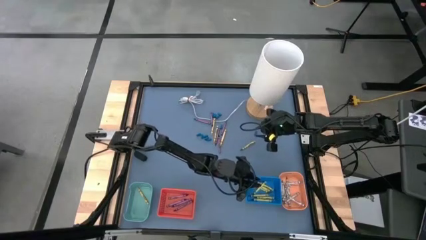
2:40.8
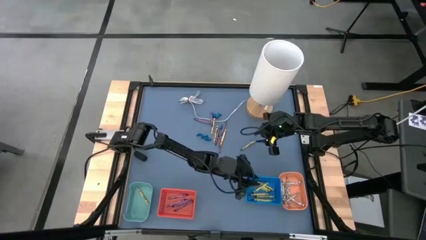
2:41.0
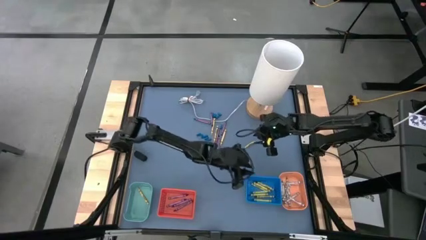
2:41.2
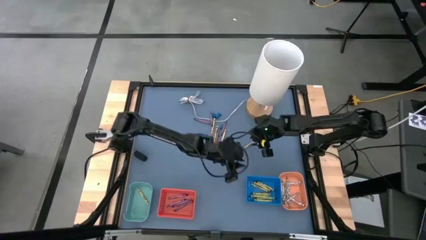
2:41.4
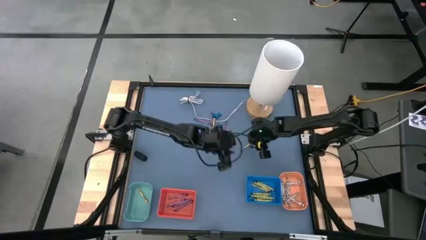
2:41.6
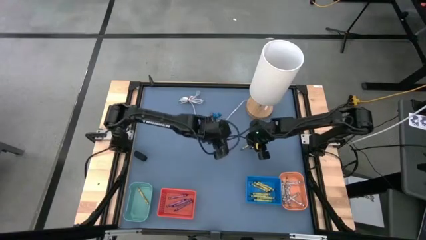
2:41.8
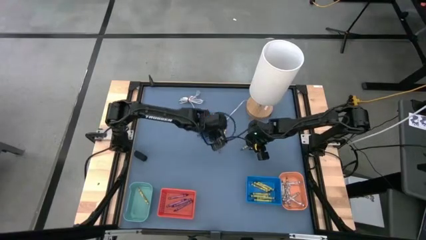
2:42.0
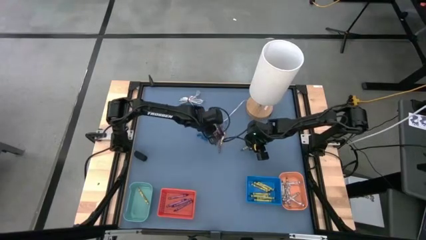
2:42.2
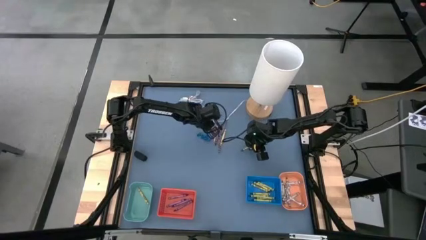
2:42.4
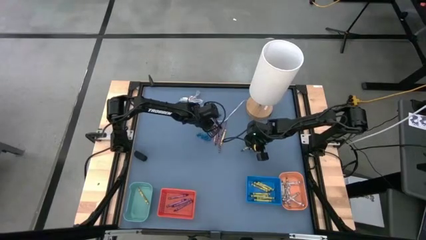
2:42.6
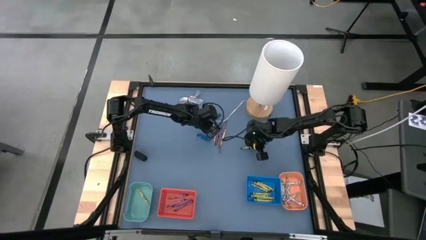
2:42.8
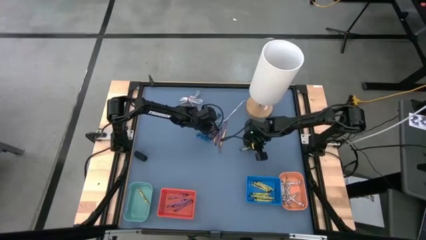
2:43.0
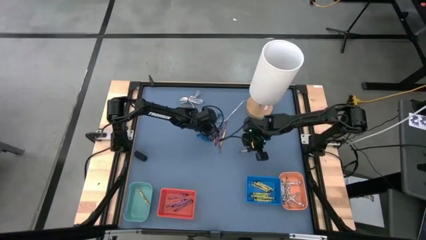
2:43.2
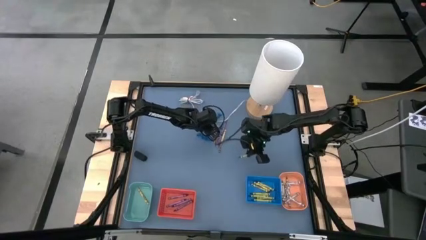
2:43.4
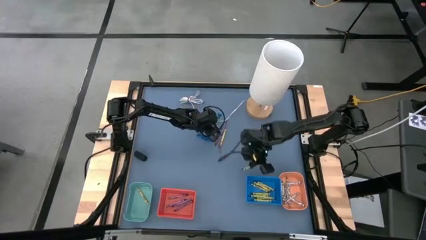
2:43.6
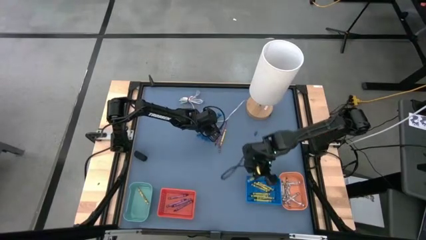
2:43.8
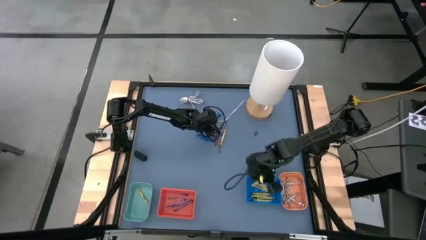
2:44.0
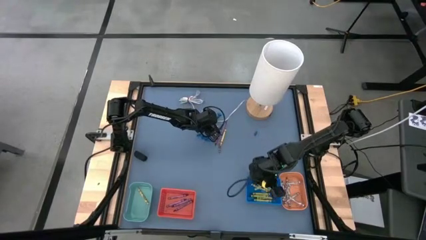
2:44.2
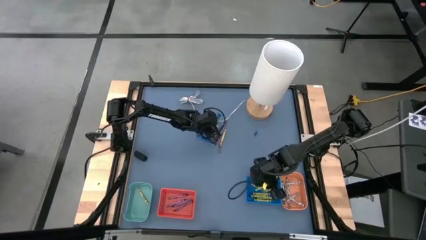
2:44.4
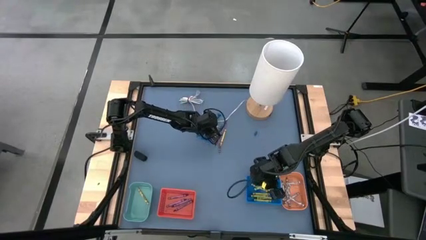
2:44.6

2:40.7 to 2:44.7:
Task: Sort crayons
Put the green crayon into the blue basket

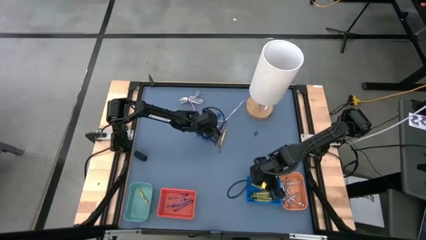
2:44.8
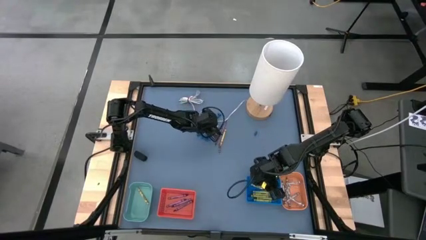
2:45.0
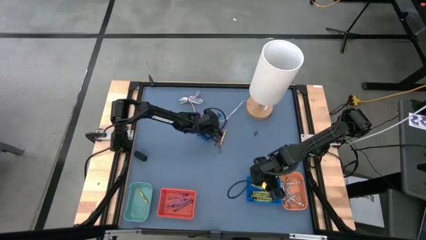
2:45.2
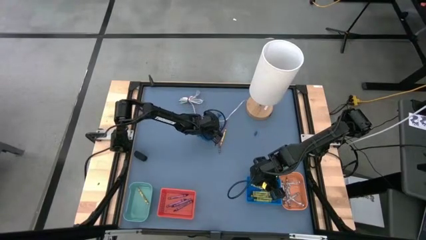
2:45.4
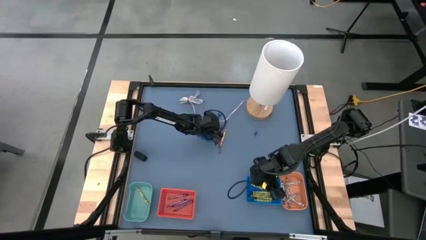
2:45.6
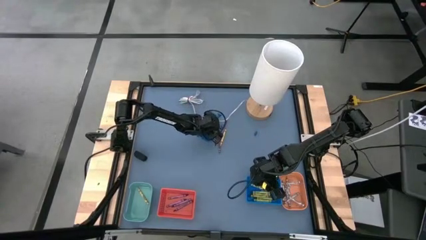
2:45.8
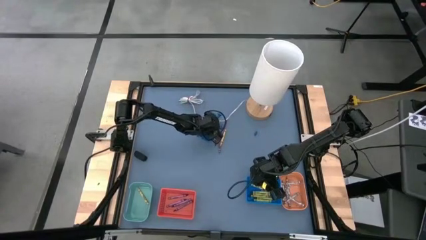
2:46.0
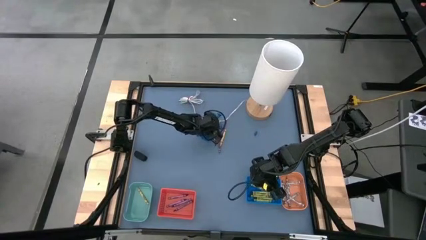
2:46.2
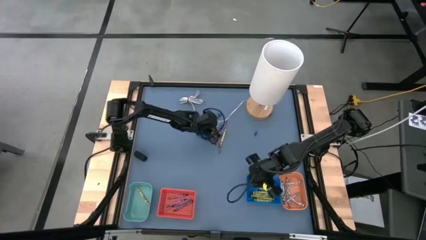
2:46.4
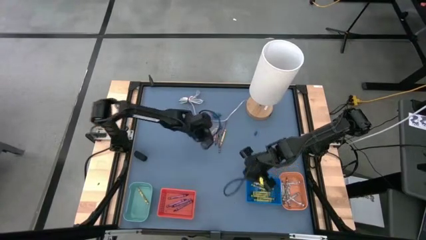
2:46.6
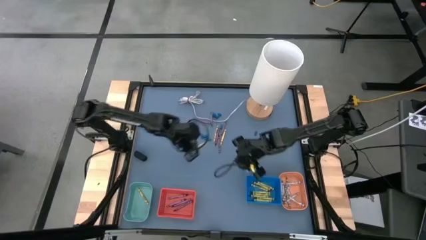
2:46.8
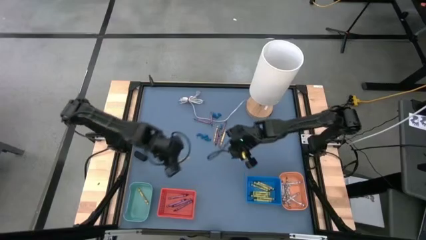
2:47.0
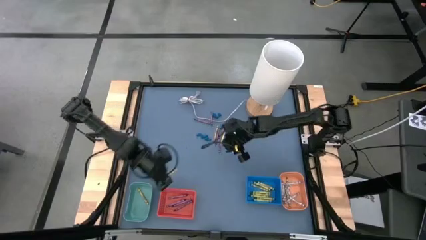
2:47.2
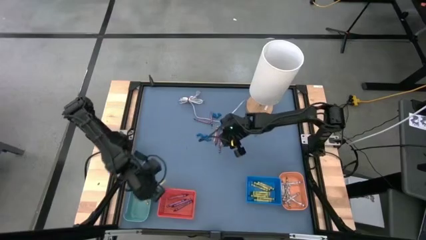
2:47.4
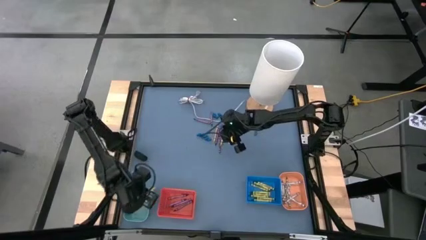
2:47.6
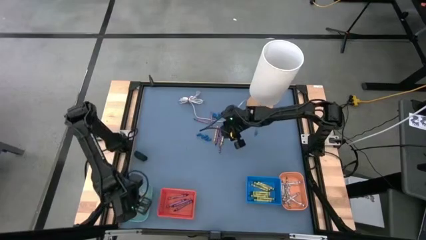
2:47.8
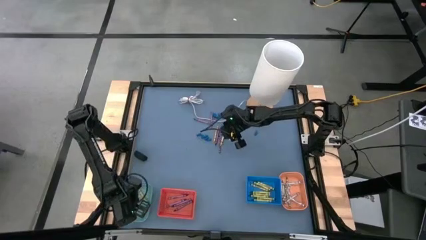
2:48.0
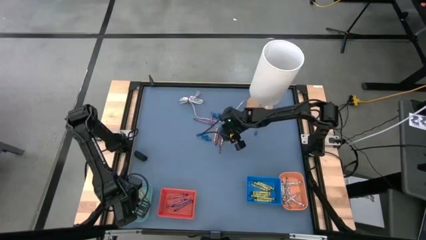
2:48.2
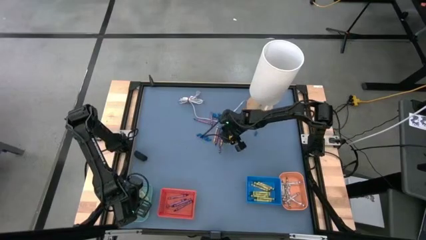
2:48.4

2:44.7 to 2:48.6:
Put the yellow crayon into the green bin

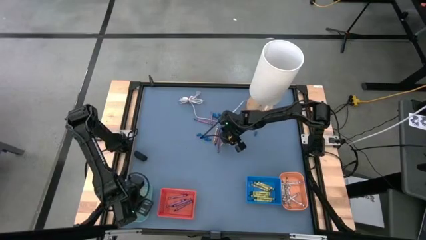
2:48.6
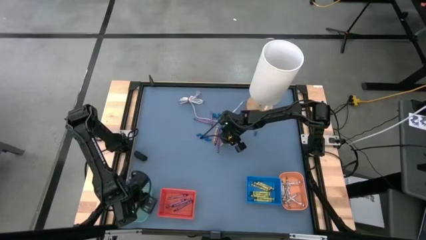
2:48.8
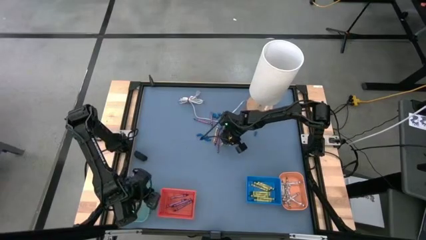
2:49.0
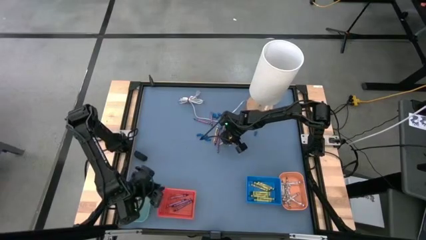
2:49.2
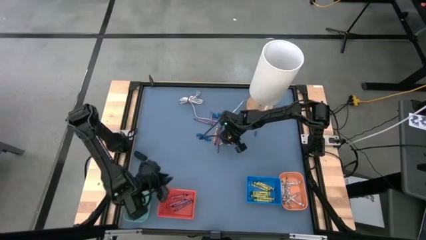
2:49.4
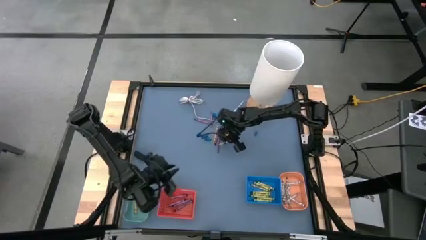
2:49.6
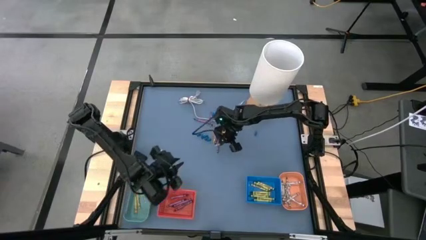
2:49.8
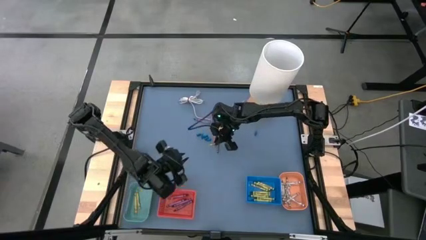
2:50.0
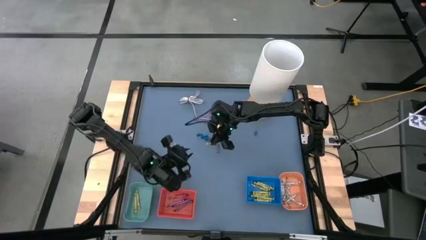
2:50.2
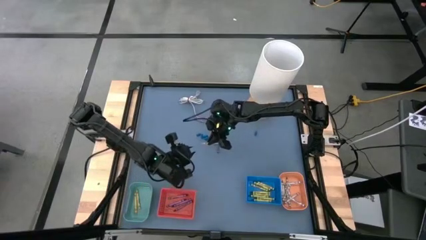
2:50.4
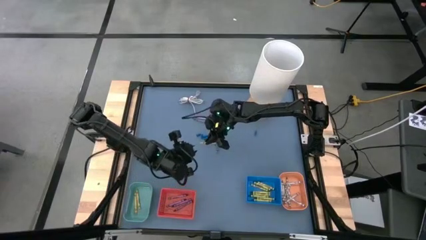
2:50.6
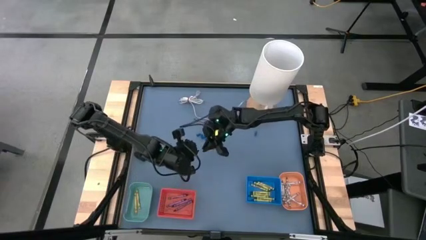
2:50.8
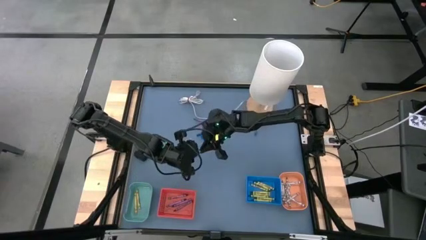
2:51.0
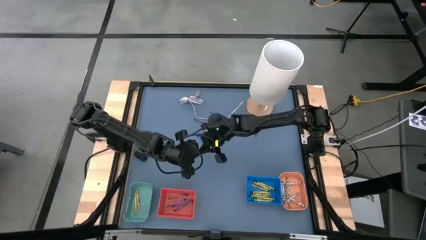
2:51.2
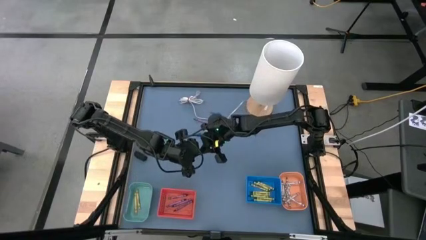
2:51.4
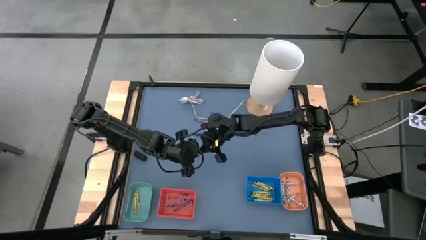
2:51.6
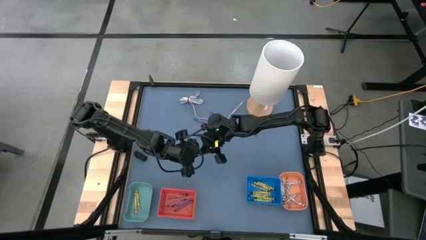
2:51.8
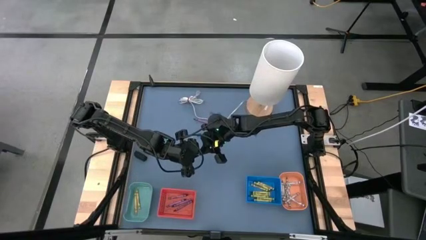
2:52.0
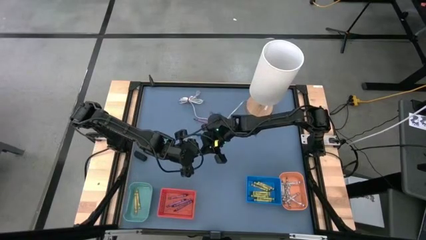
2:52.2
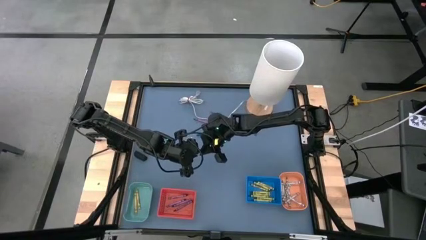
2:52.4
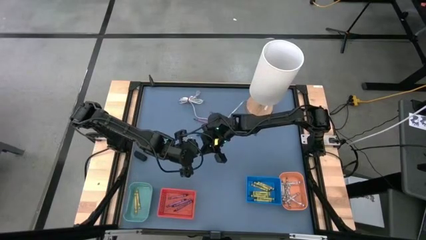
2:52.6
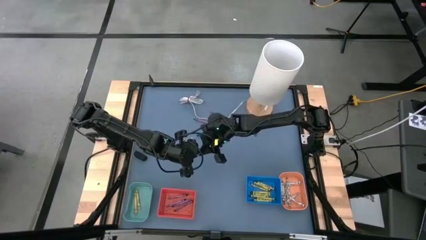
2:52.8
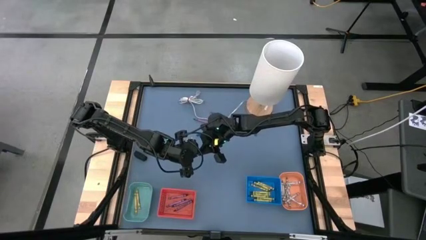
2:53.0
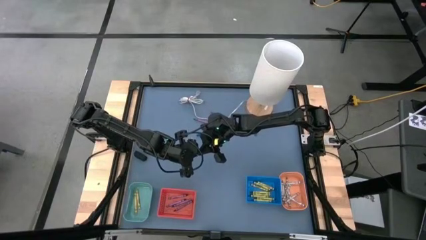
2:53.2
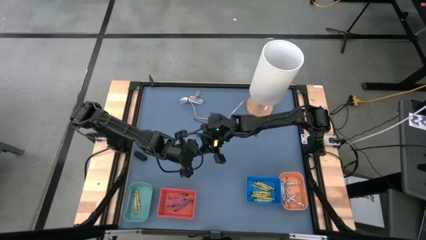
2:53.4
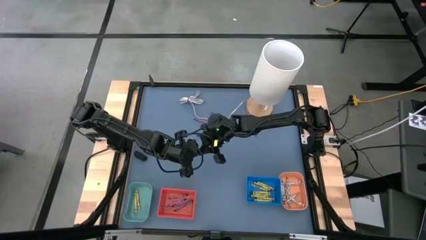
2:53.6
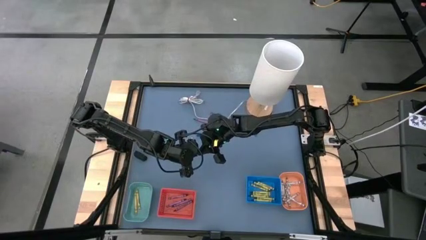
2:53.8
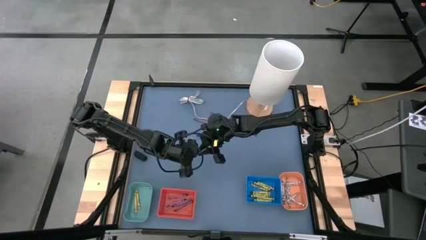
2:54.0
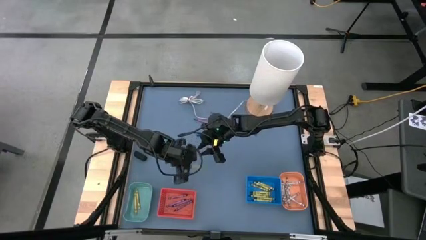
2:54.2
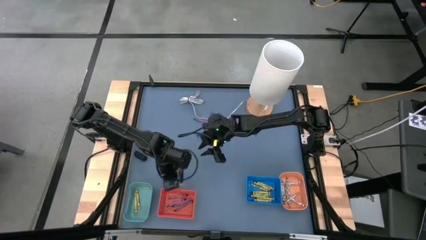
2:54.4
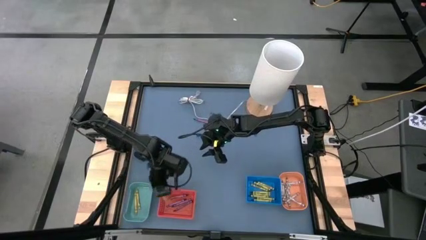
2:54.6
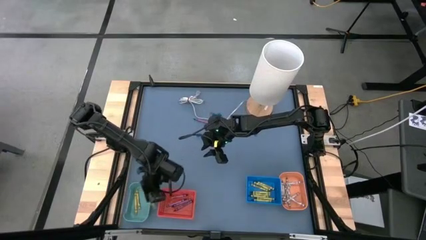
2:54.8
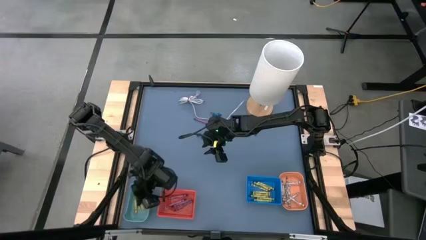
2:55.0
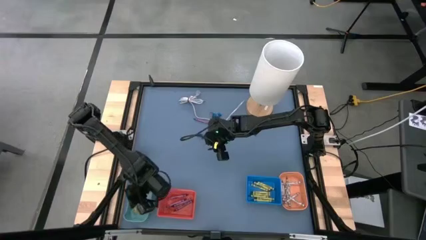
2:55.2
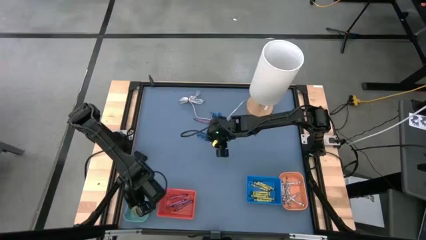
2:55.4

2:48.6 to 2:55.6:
Put the yellow crayon into the green bin

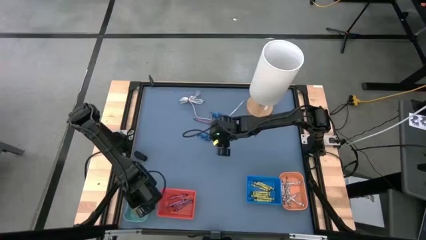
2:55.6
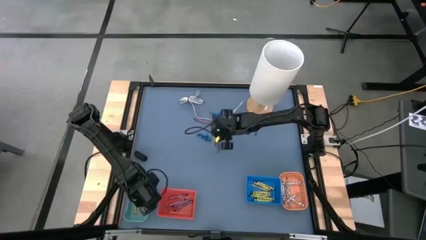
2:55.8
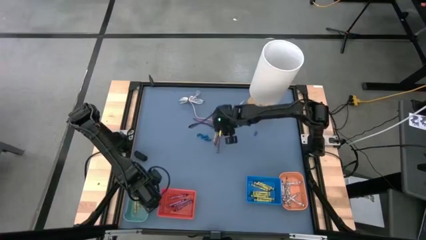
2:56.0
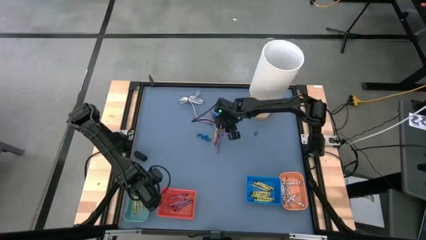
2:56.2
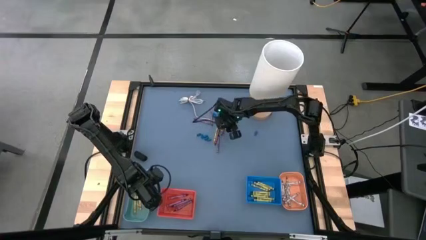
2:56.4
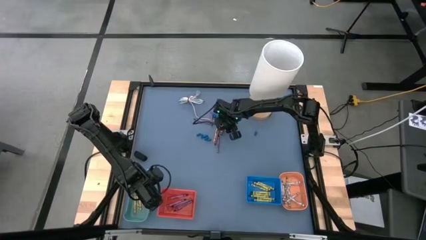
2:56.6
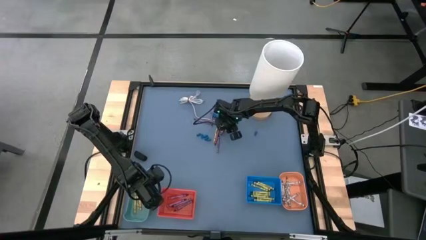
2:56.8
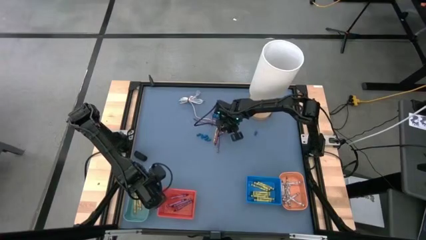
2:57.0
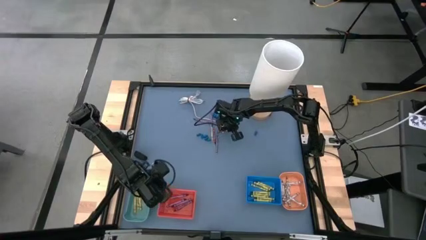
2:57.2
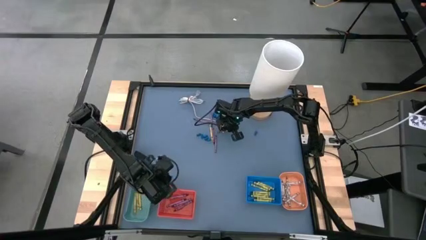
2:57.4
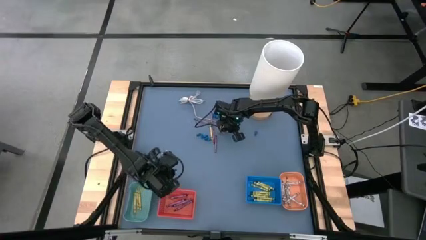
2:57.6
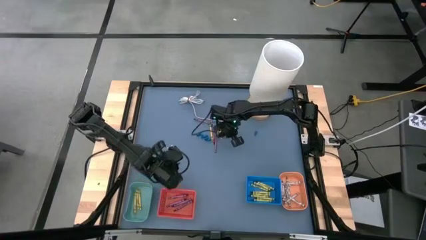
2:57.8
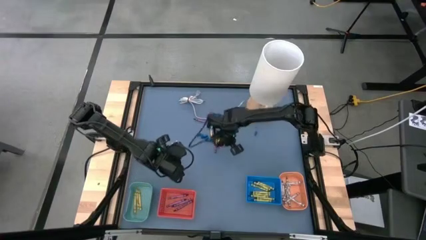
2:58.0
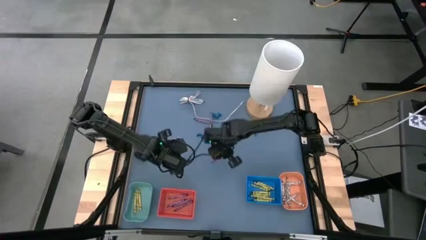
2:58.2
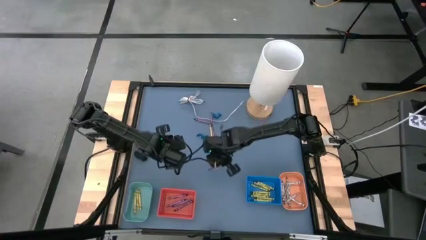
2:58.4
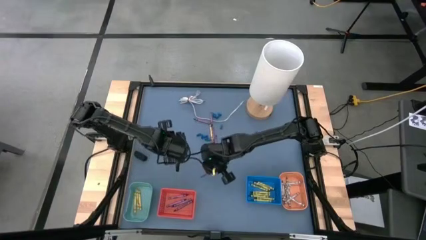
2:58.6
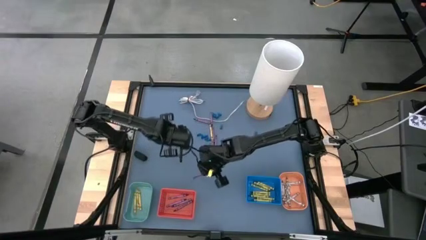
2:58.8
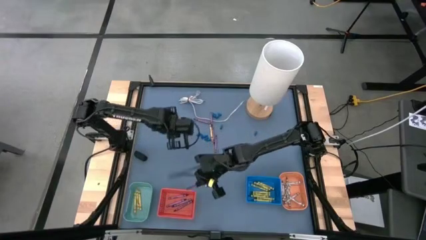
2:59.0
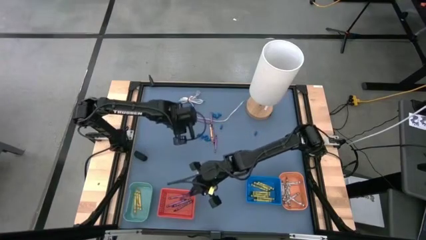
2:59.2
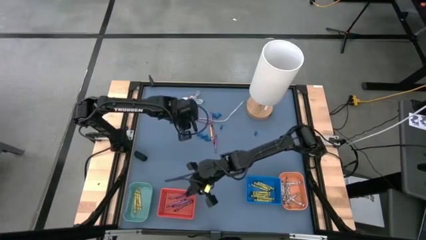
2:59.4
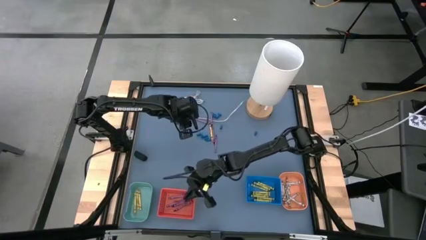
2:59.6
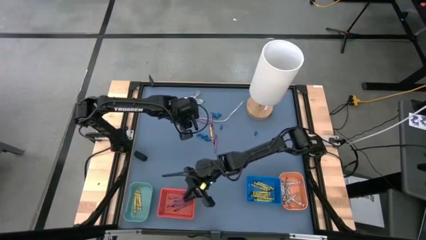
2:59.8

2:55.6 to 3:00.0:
Put the red crayon into the red basket
